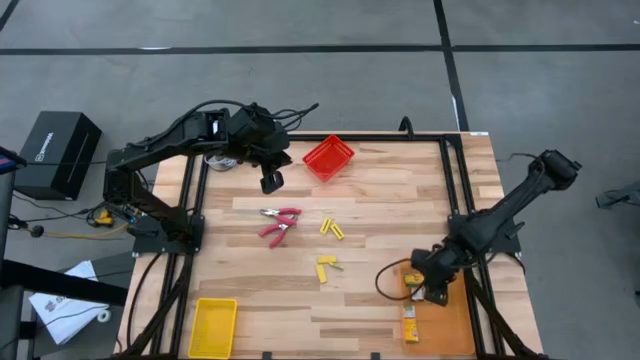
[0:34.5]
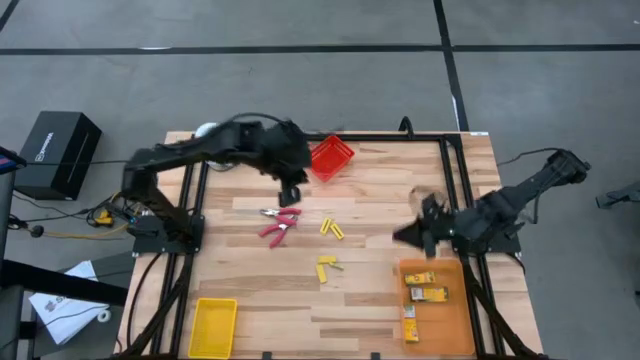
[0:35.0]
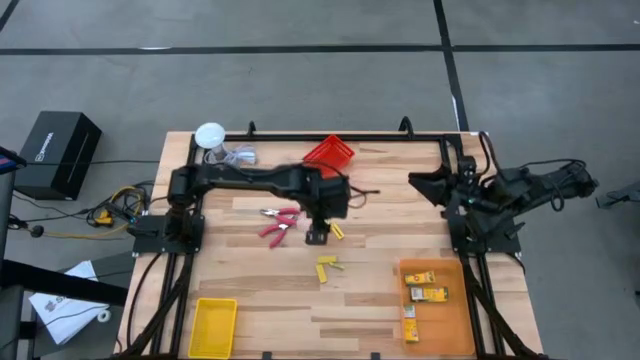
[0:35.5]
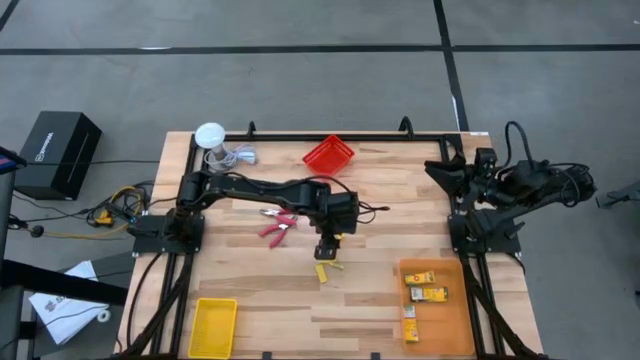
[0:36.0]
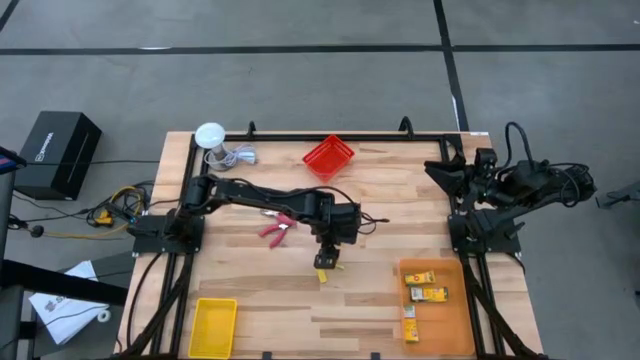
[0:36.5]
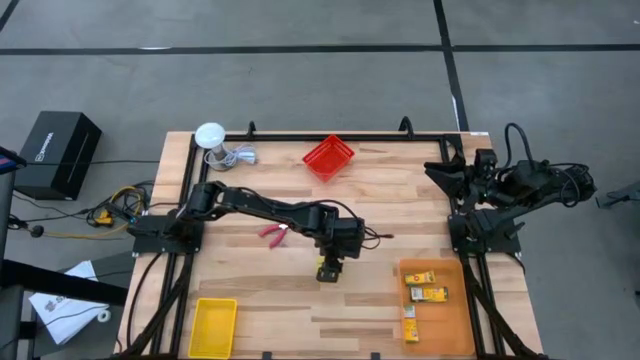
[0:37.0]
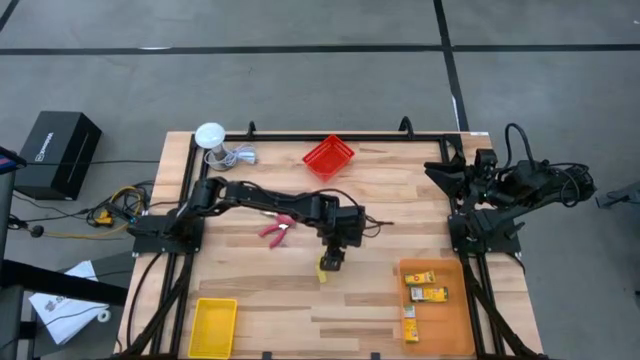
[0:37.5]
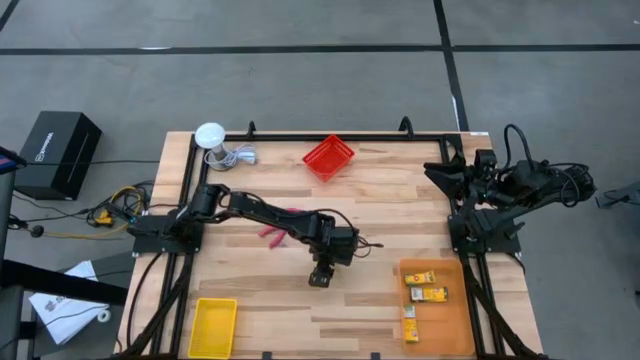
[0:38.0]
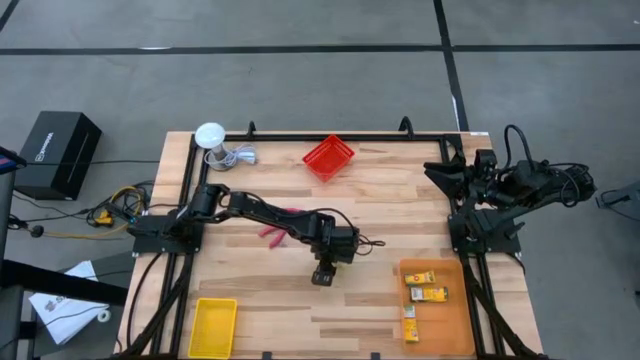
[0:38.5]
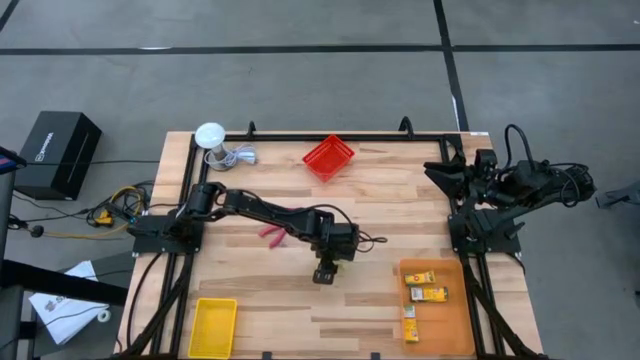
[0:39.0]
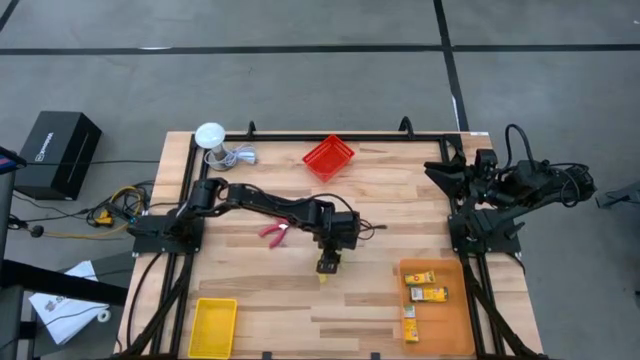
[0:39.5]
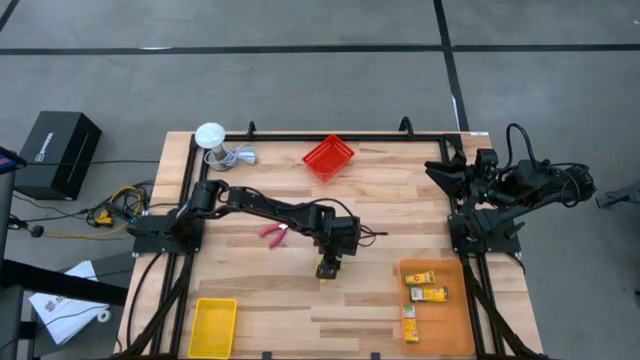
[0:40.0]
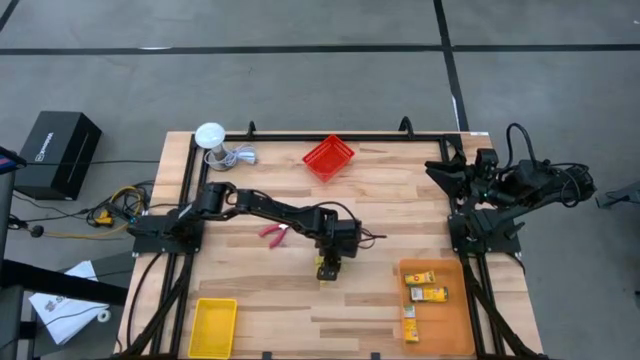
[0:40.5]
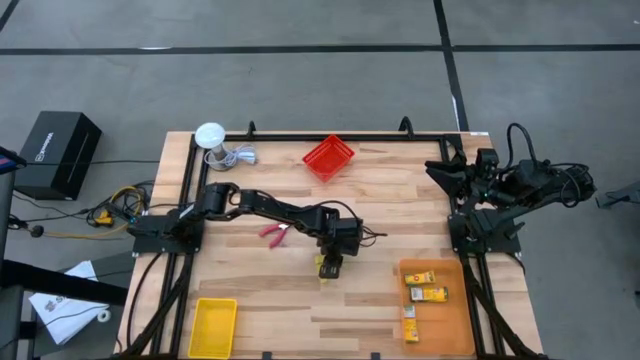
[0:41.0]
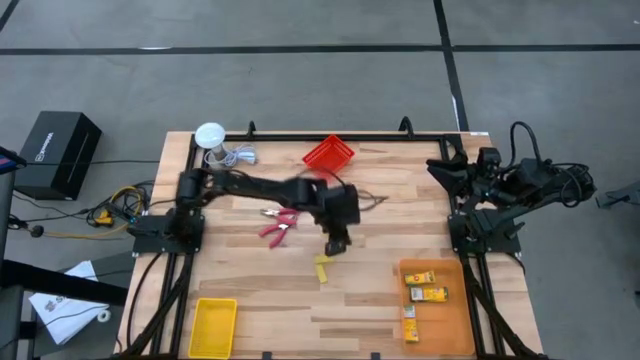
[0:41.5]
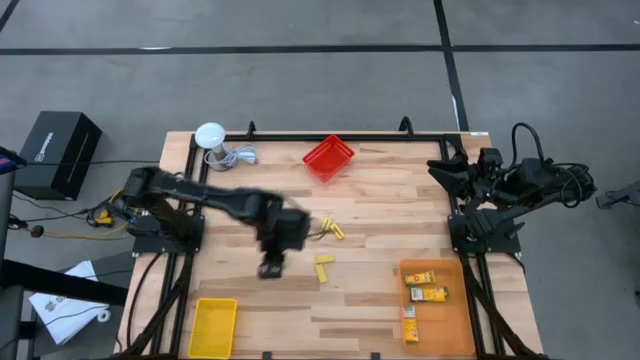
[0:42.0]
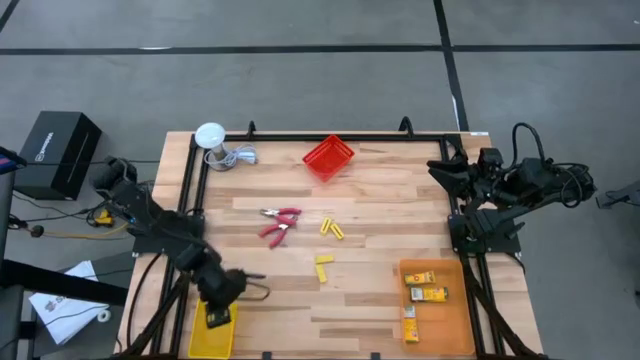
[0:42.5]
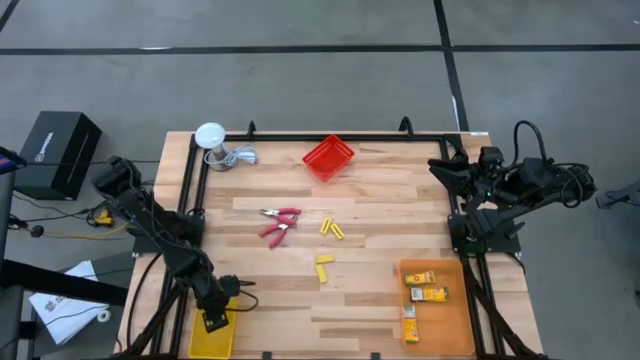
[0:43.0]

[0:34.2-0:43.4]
Task: Pick & Place School Supplies
Put the yellow eraser into the yellow bin

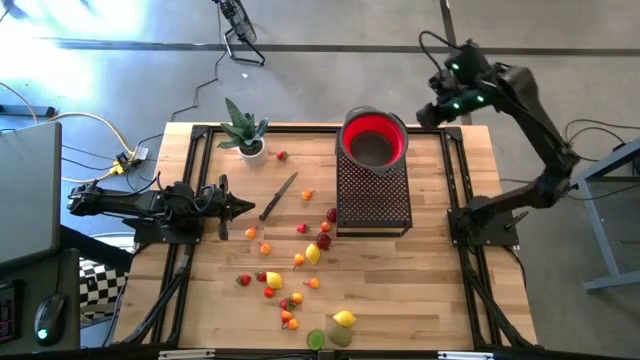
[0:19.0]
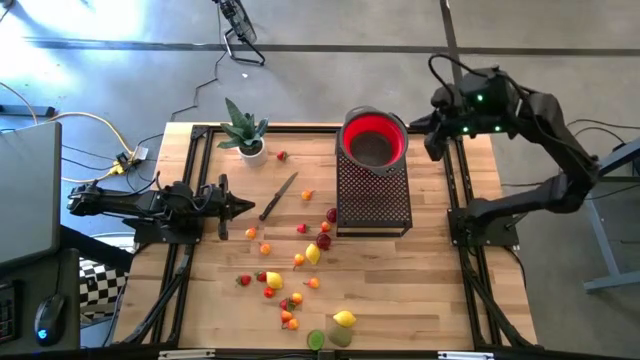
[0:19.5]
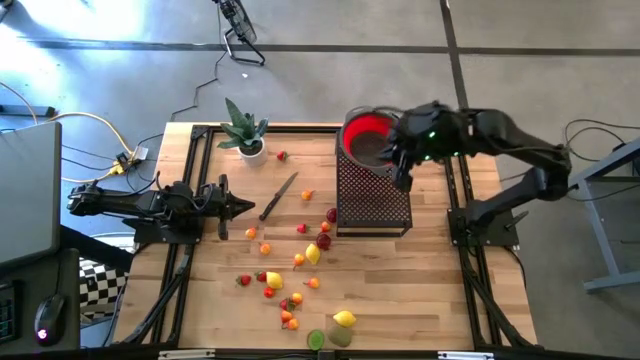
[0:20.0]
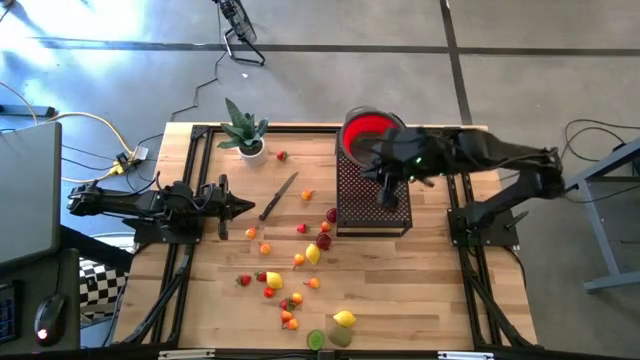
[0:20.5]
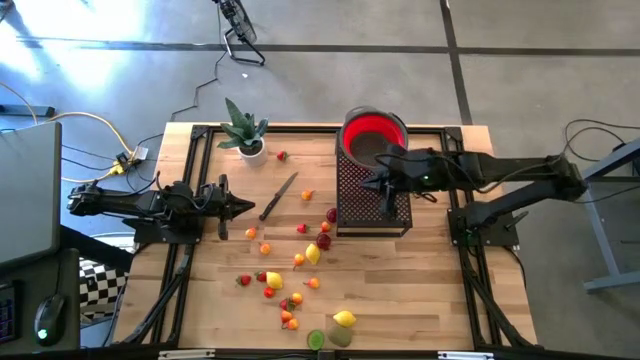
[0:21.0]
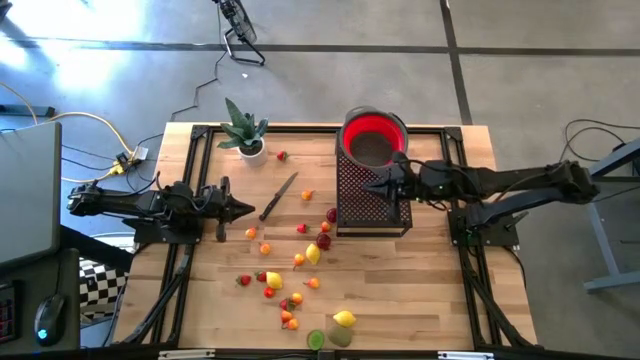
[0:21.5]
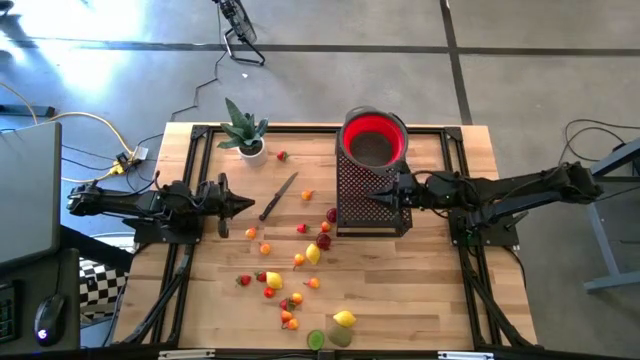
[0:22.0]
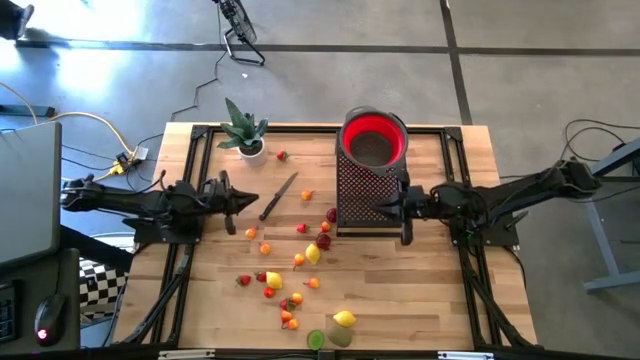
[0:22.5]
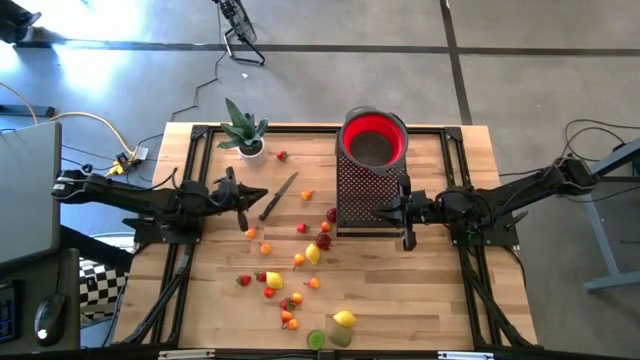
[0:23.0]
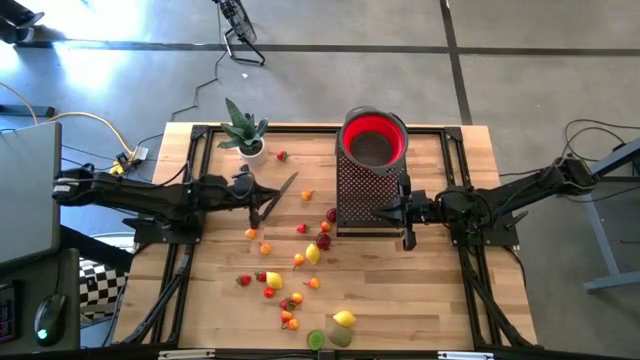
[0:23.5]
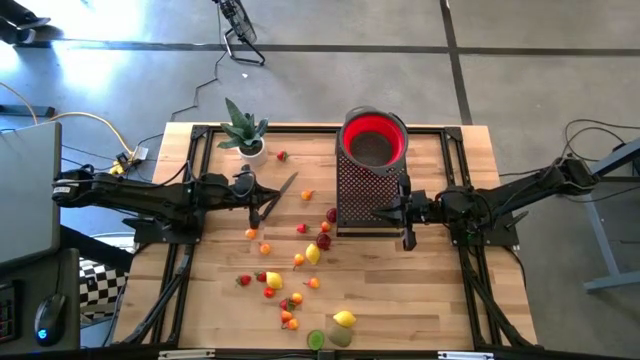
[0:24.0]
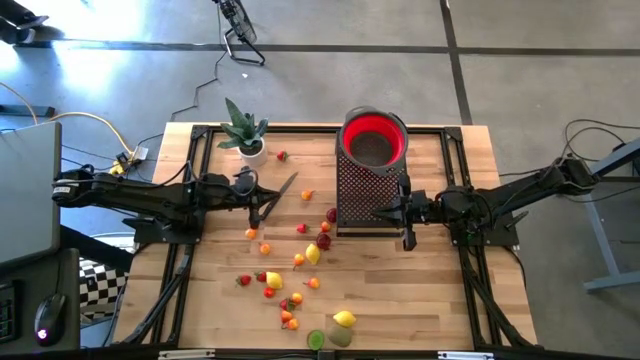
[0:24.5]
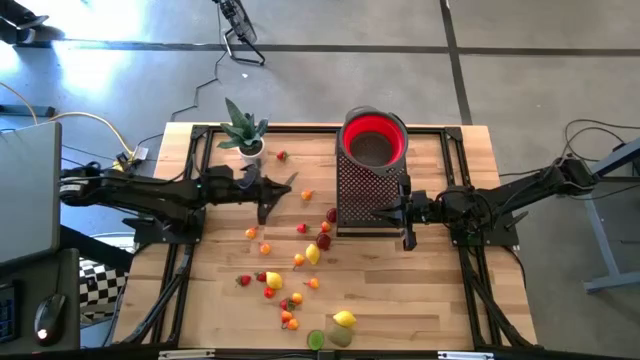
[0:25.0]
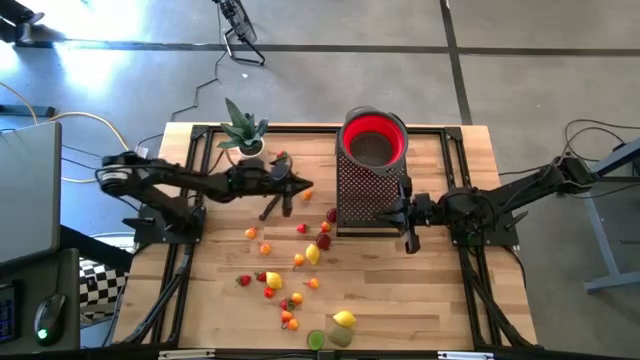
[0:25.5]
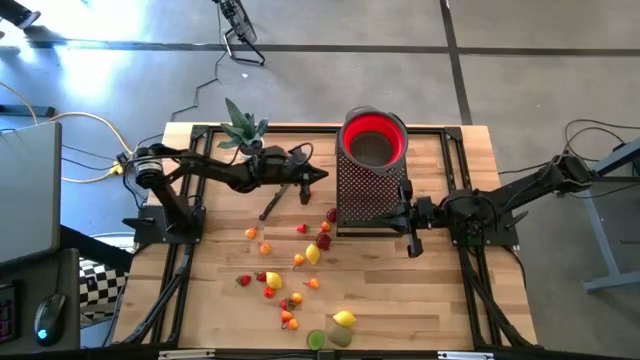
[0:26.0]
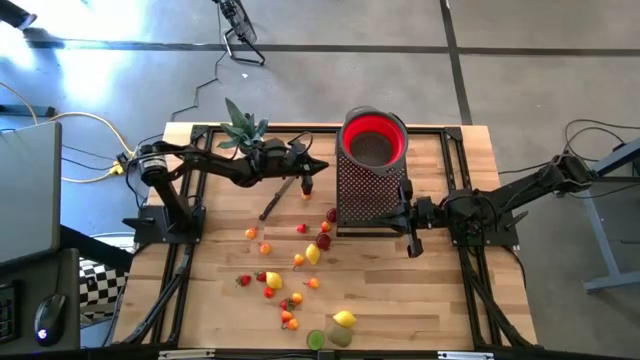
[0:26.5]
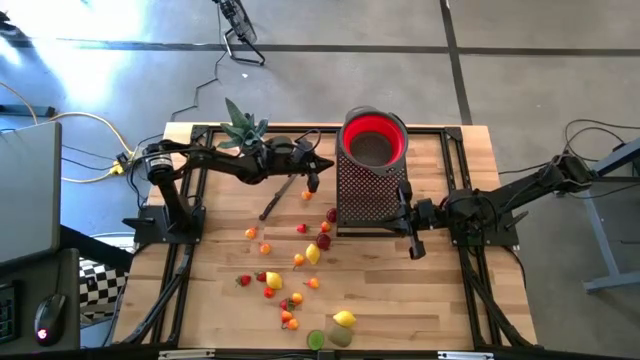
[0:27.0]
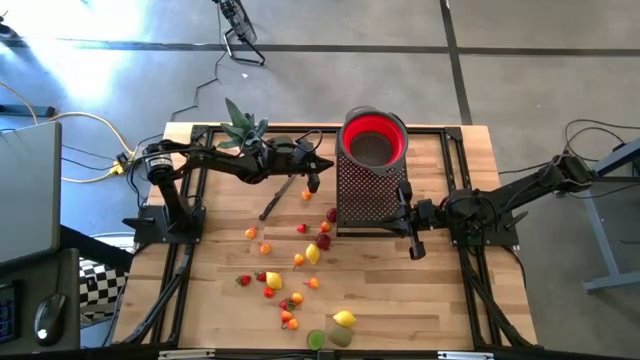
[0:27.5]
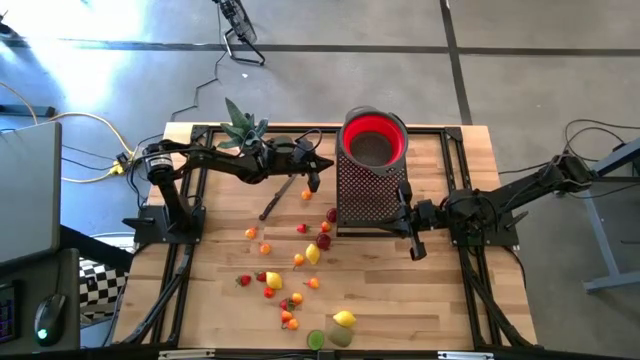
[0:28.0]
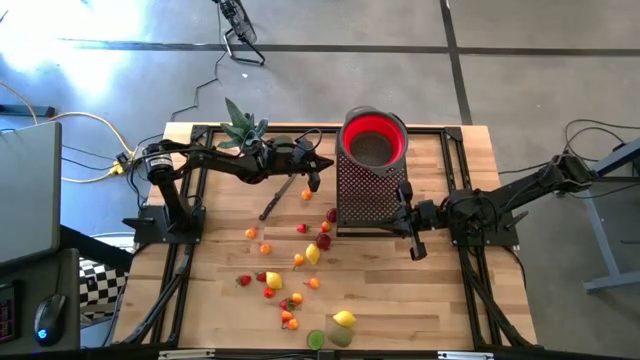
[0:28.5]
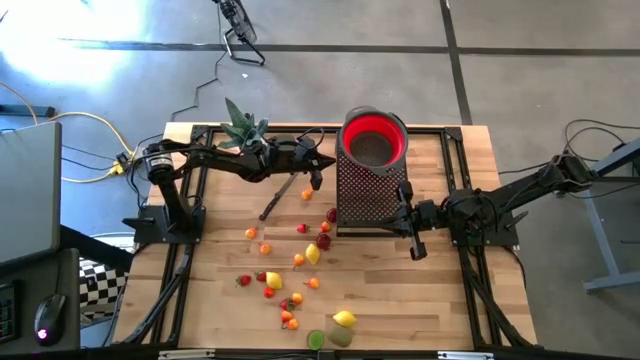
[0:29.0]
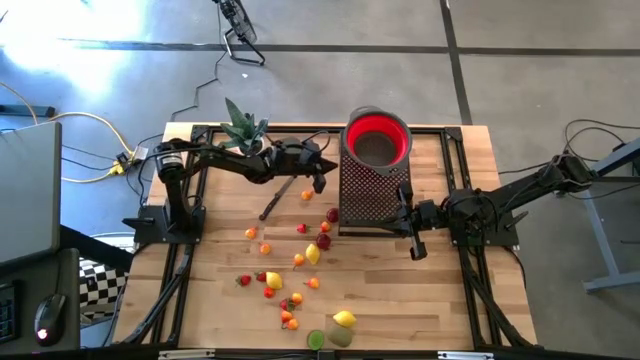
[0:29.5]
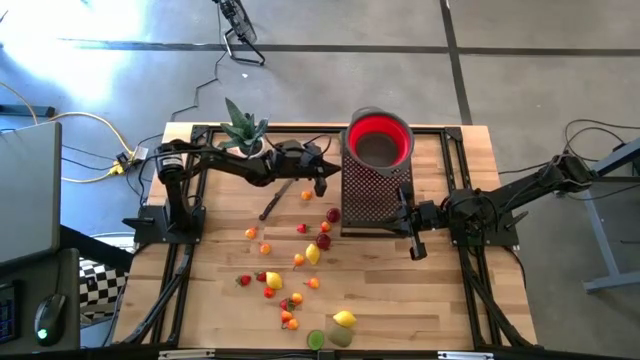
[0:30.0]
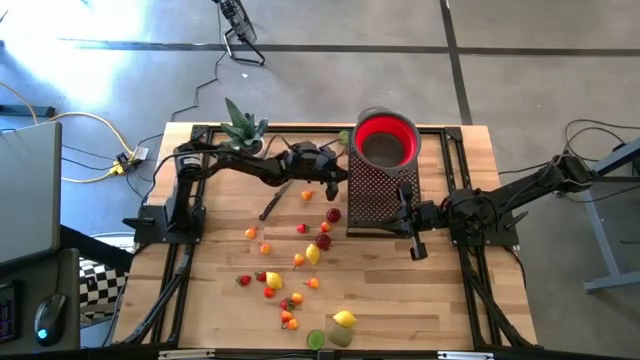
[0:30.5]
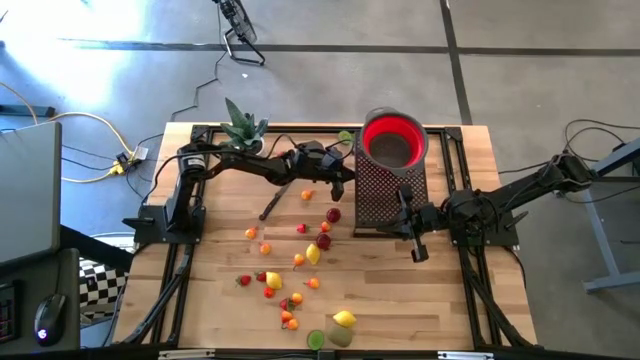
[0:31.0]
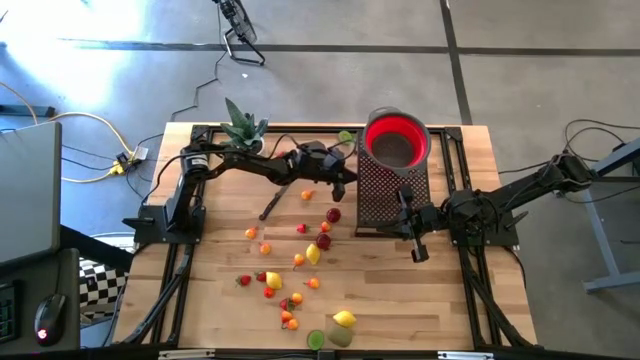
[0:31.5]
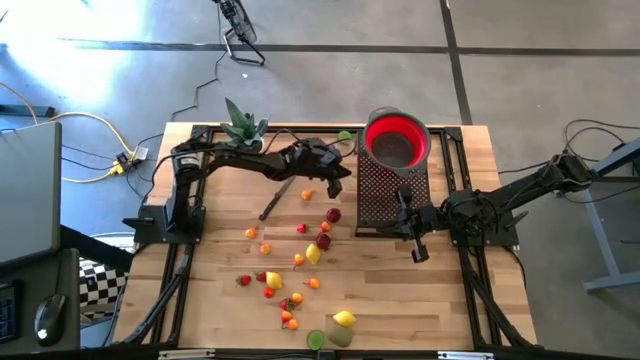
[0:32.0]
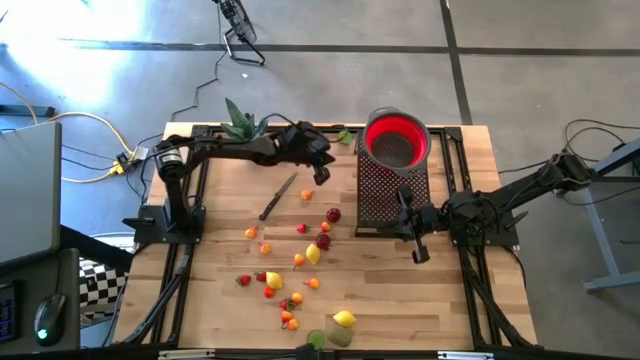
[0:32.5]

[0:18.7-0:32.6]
Task: Pick & Place Fruit
Adjust the shelf
